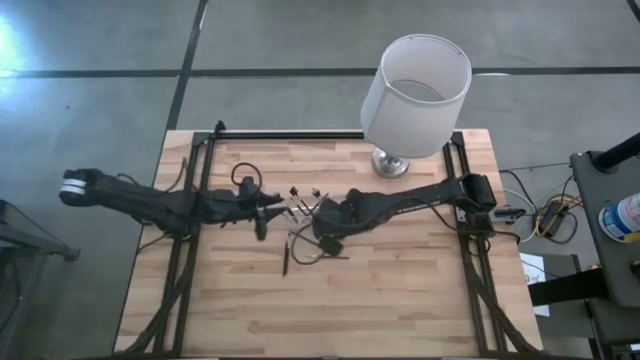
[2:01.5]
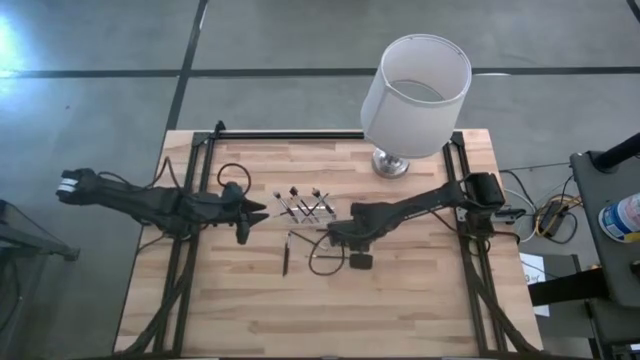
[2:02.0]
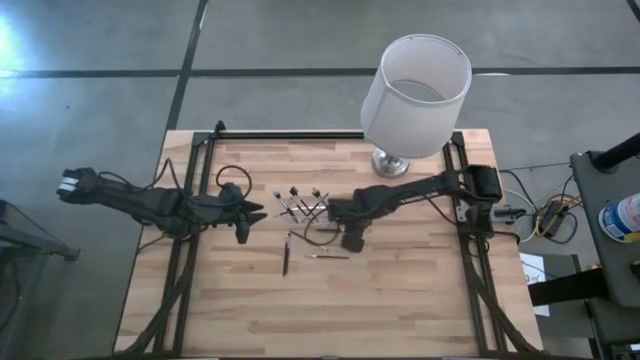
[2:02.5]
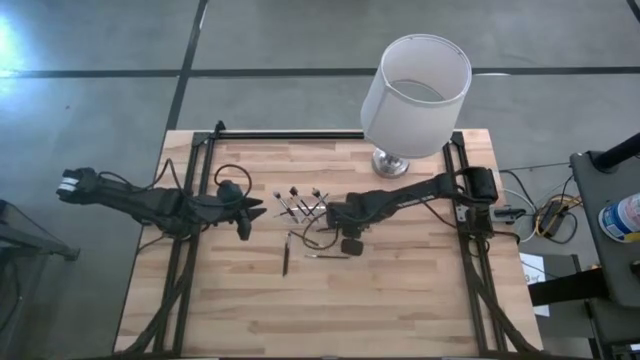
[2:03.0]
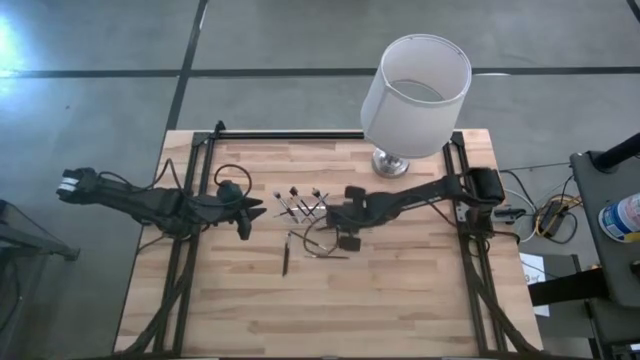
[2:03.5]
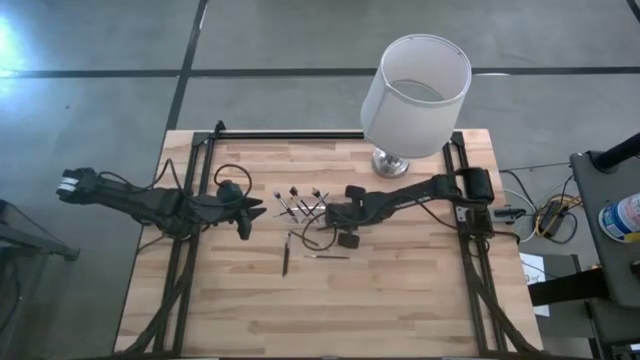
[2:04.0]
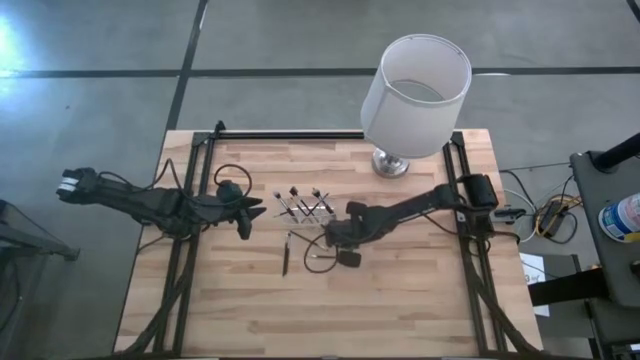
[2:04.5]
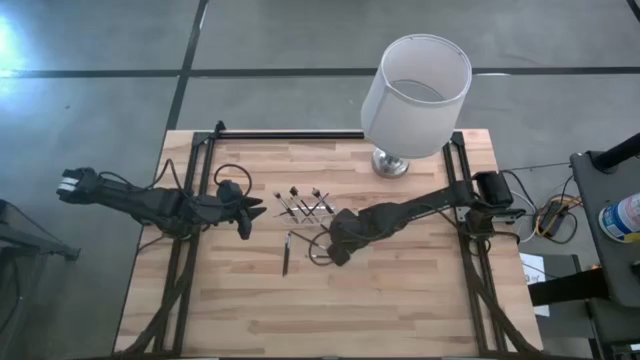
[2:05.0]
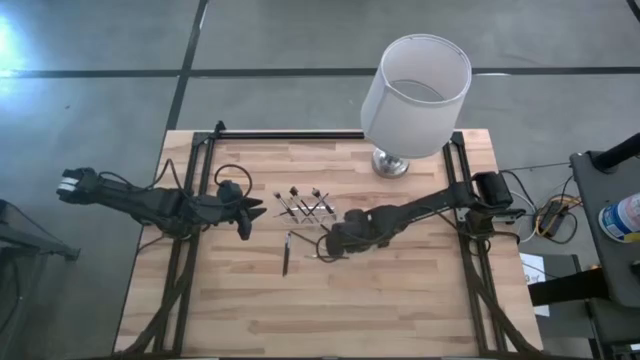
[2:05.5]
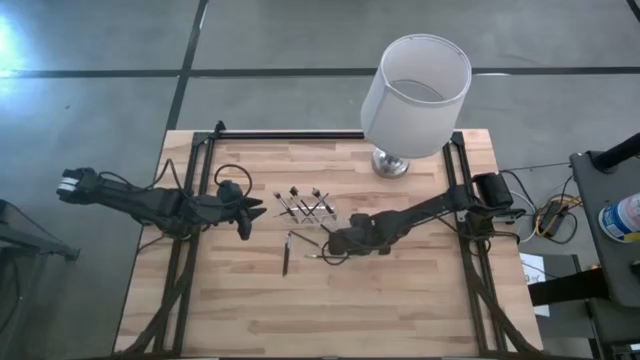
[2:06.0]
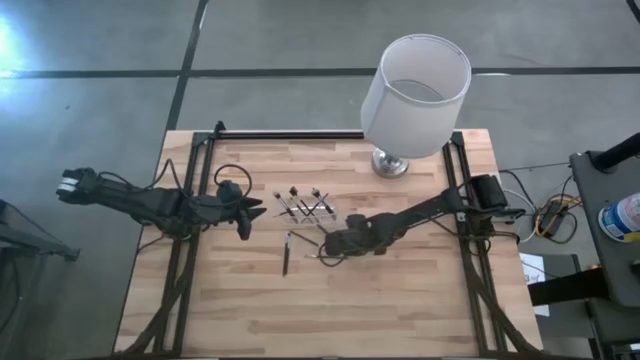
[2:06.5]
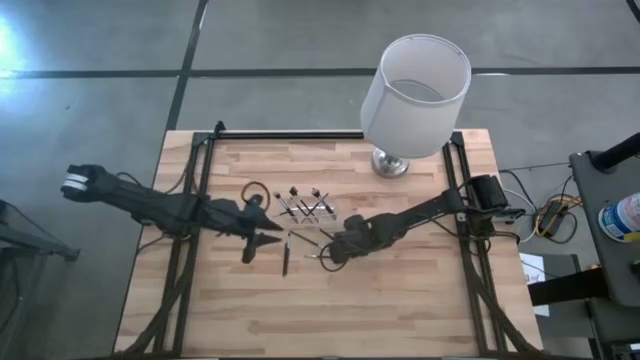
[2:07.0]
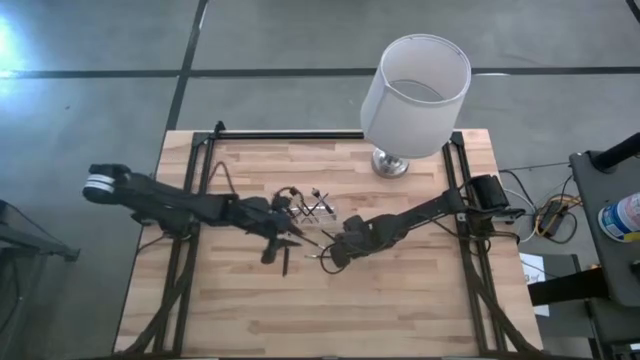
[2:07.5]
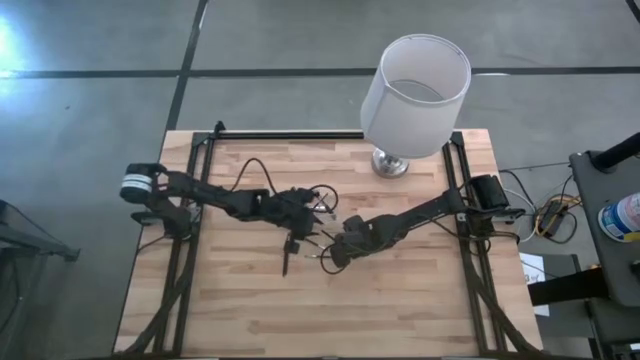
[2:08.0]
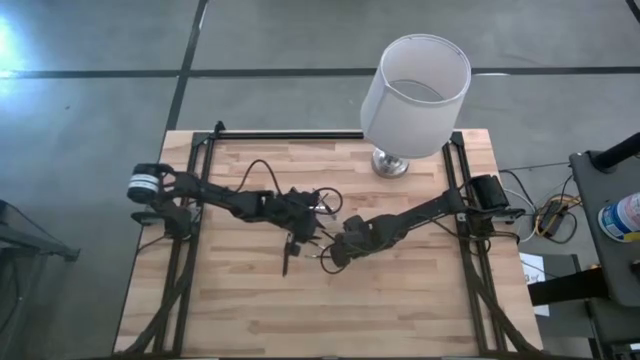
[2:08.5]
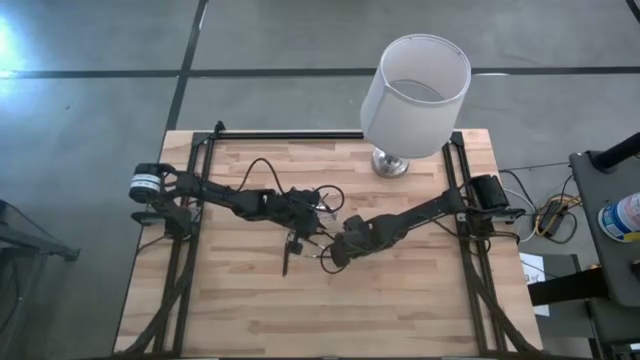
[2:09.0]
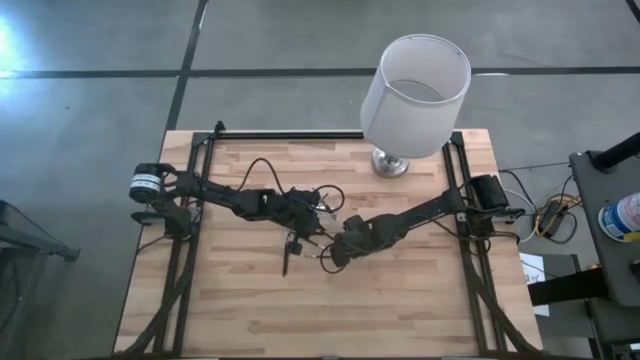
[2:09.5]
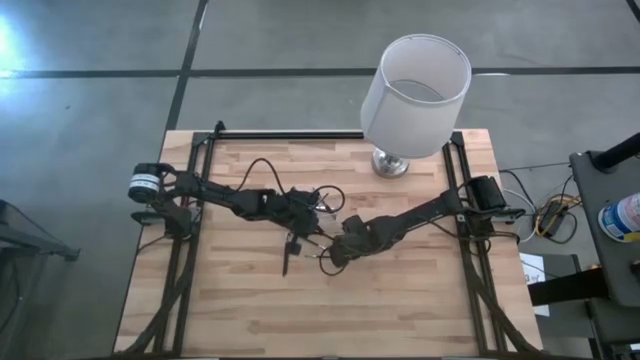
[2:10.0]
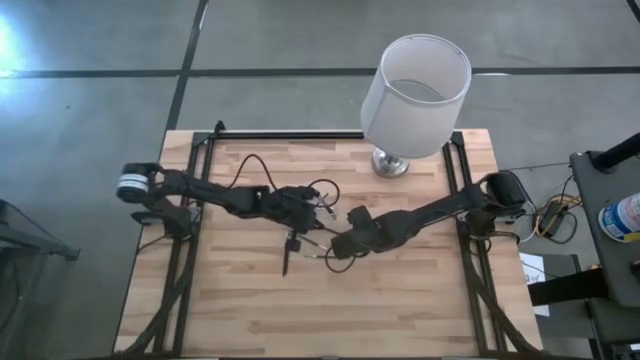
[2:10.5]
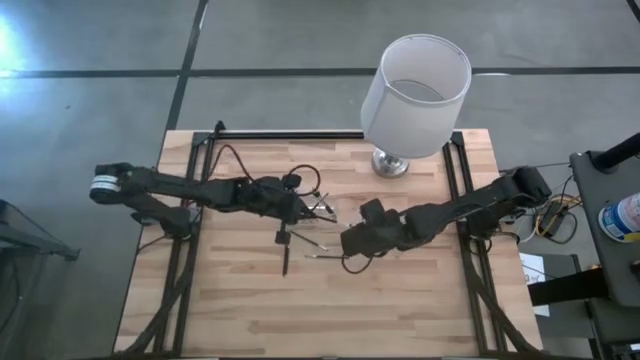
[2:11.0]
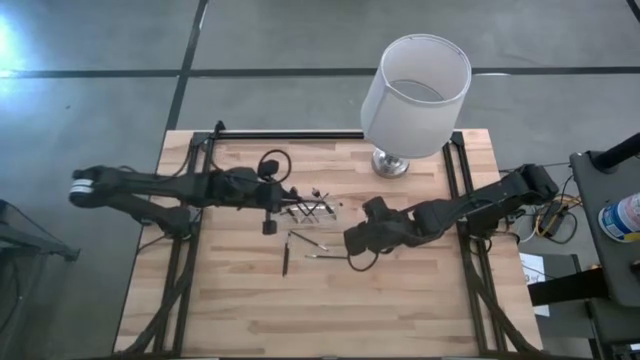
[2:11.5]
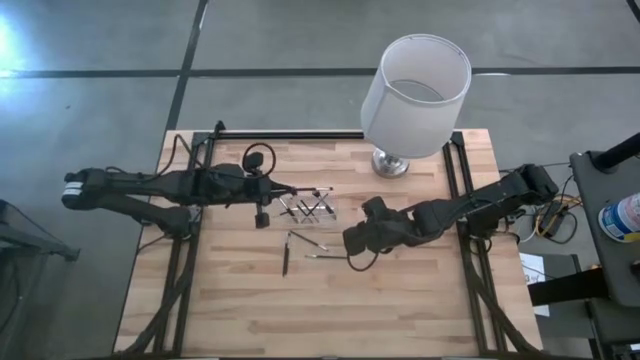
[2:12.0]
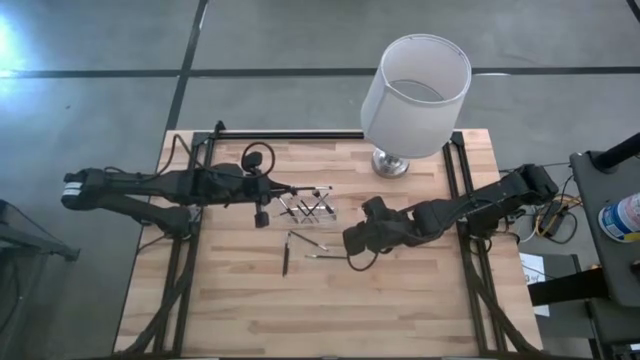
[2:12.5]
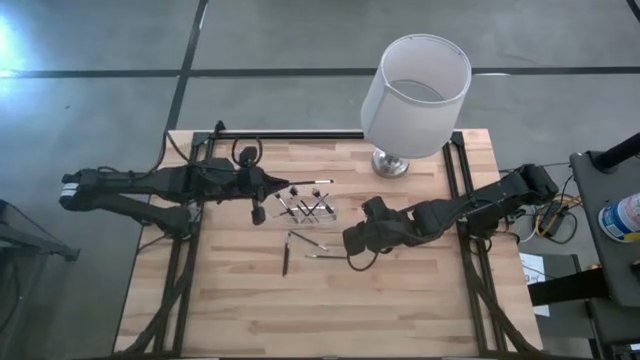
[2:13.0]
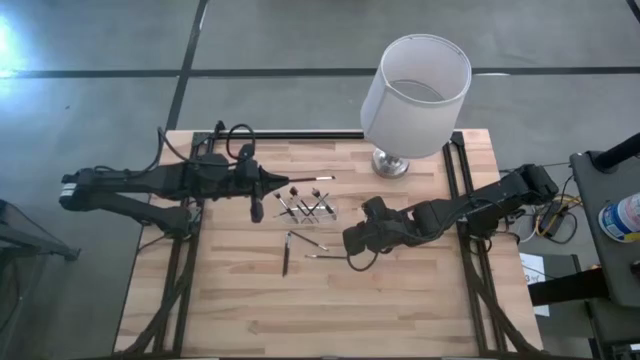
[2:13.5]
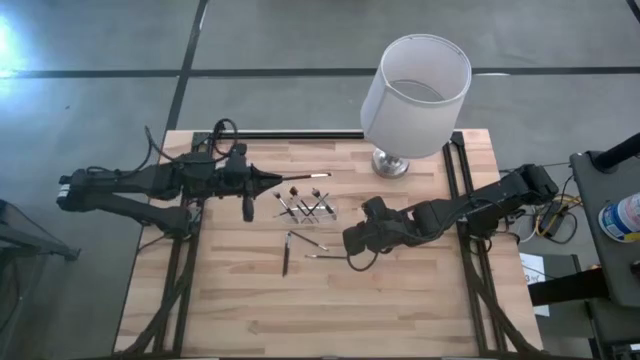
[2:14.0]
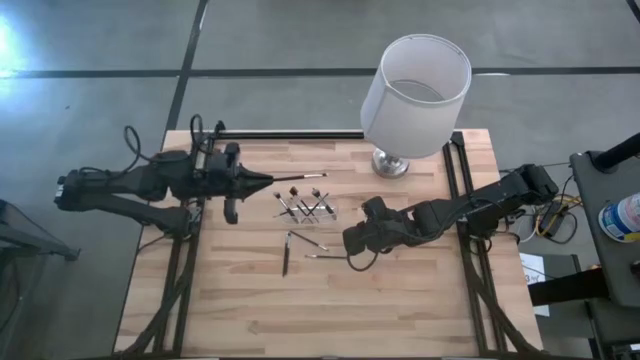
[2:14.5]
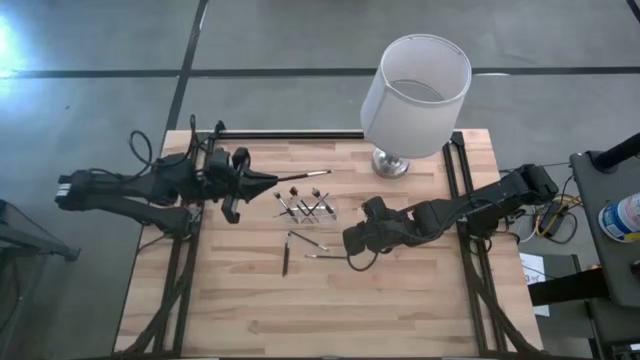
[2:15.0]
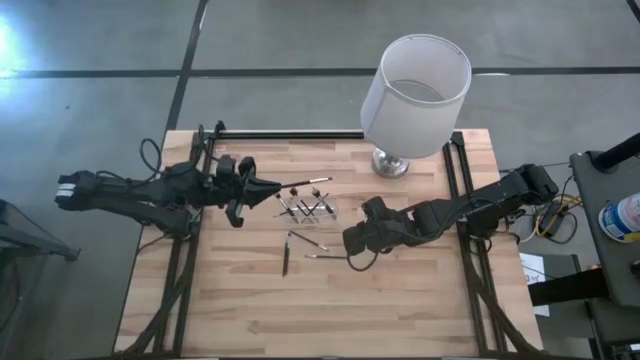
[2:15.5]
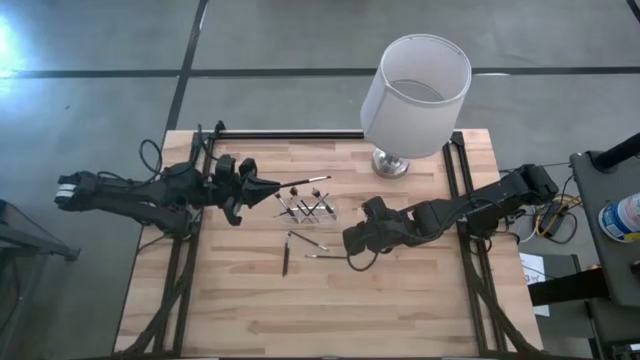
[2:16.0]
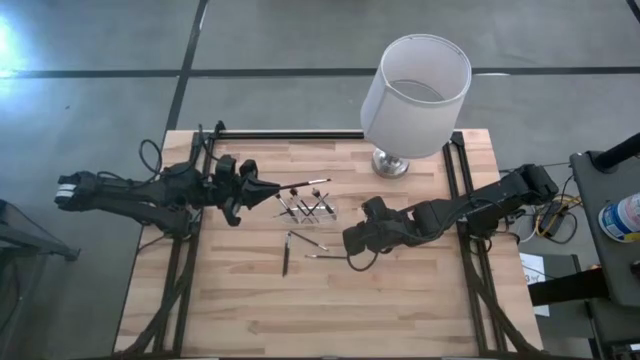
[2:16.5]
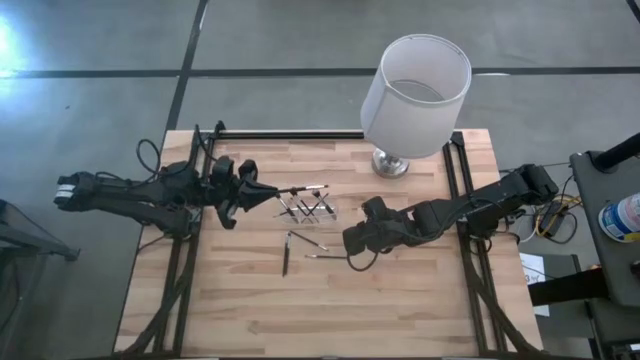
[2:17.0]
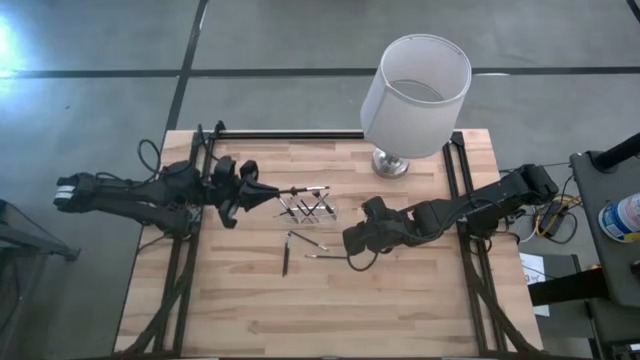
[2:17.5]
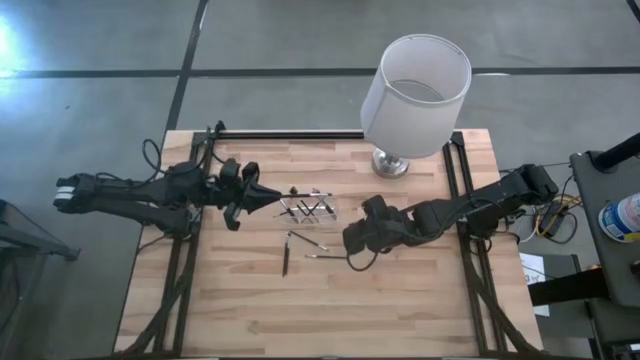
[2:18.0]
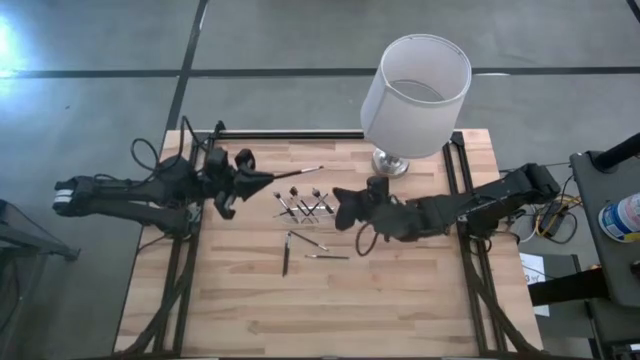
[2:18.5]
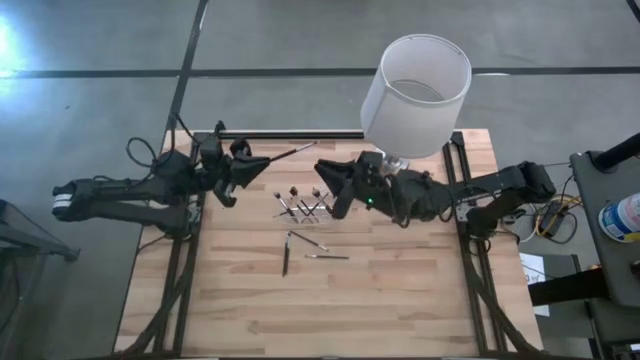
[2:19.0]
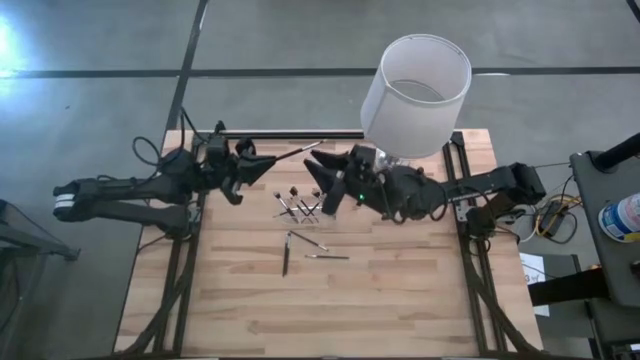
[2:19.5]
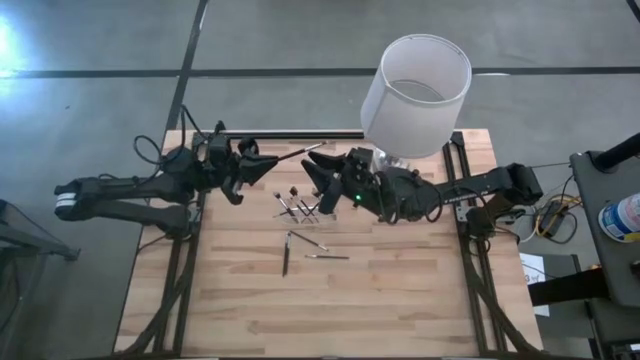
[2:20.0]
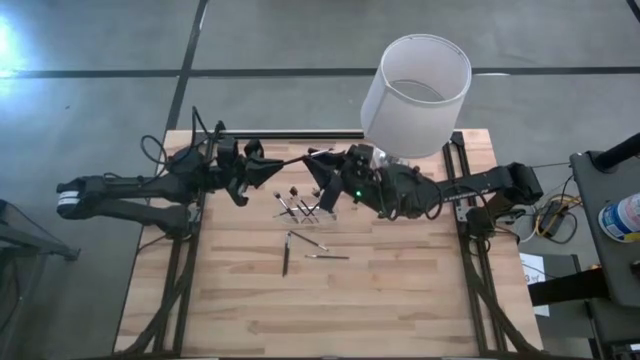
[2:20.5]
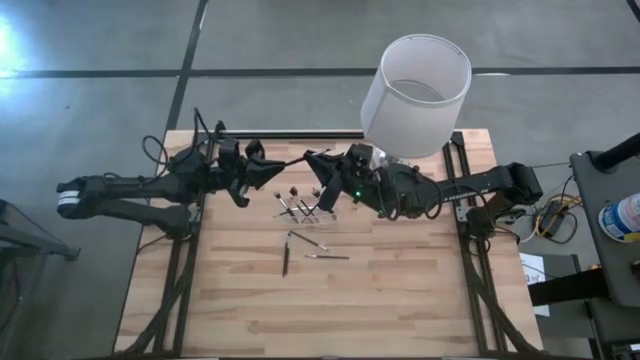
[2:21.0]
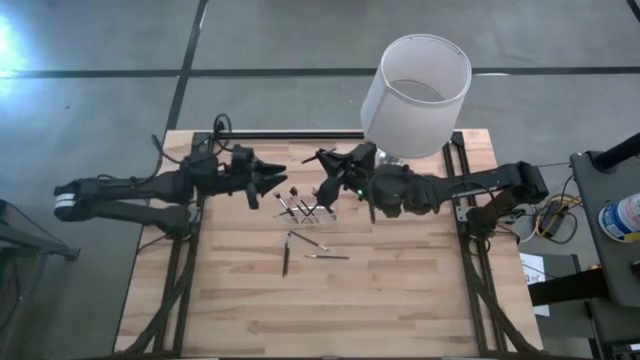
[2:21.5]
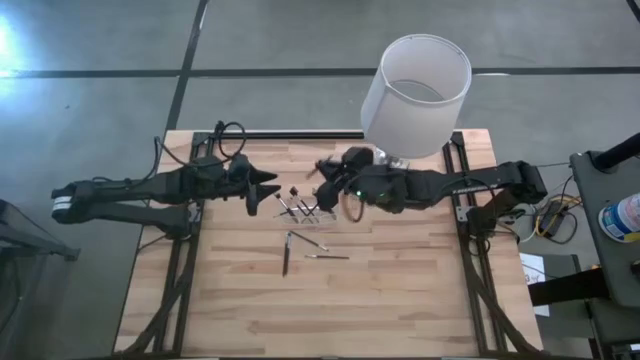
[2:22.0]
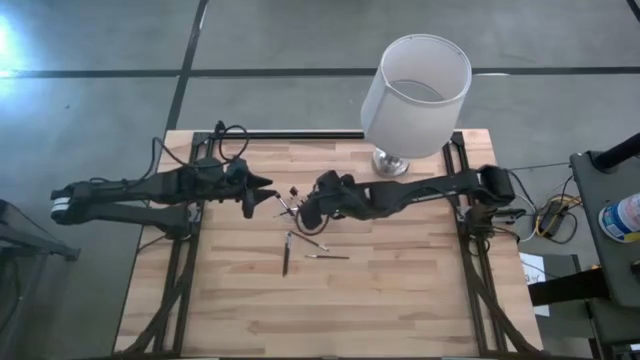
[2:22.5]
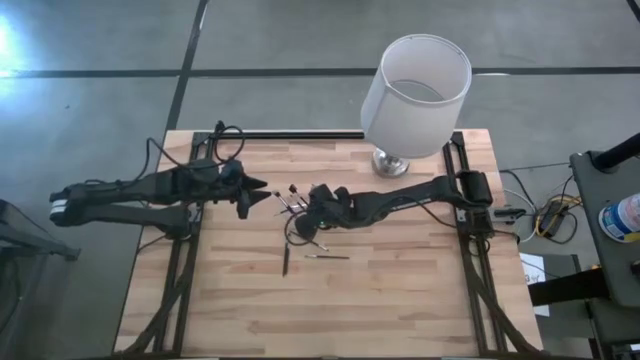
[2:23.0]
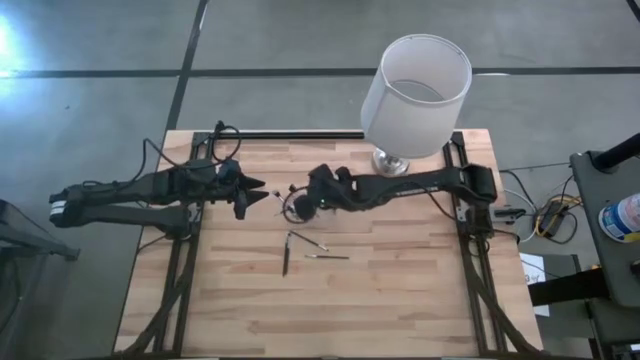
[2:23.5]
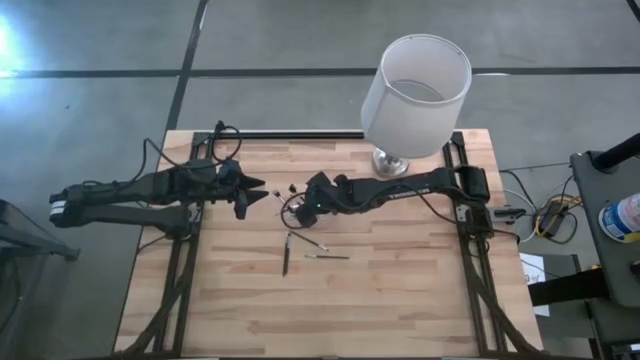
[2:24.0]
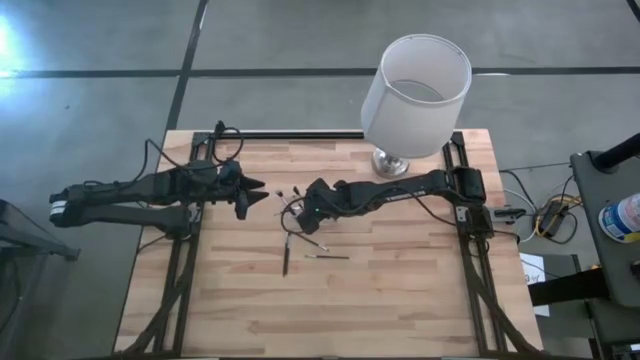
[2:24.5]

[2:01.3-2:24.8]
Task: Put items in baskets/containers
Put the foundation brush into the transparent organizer
